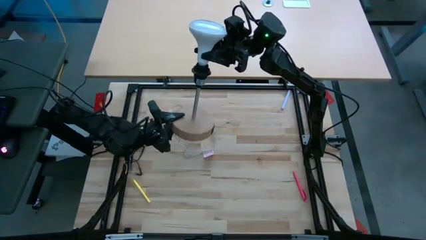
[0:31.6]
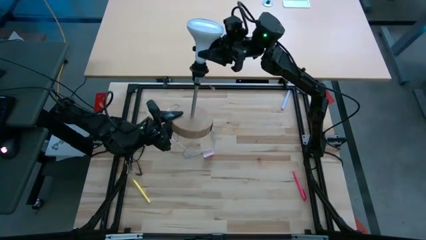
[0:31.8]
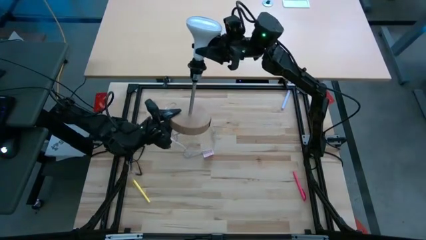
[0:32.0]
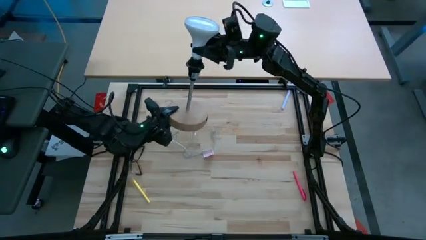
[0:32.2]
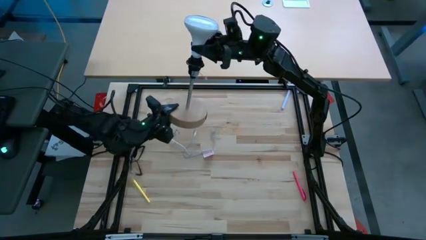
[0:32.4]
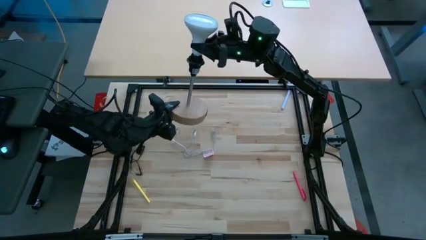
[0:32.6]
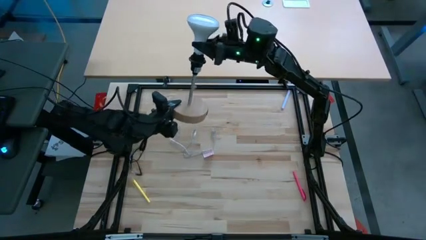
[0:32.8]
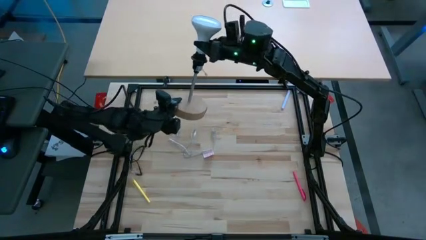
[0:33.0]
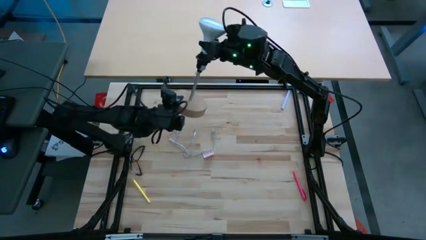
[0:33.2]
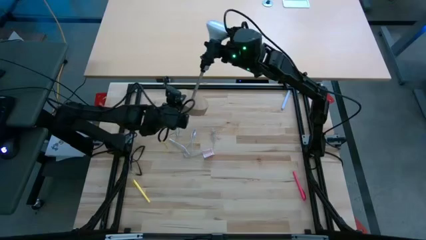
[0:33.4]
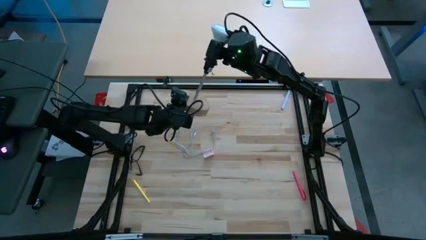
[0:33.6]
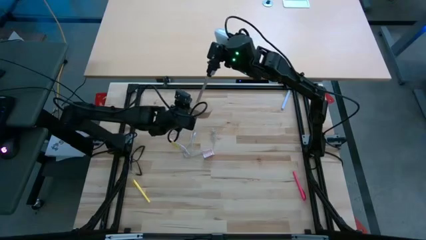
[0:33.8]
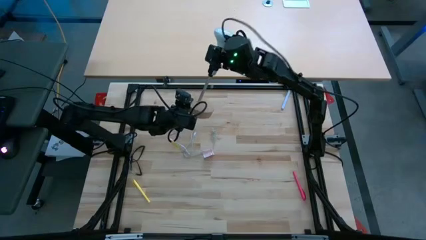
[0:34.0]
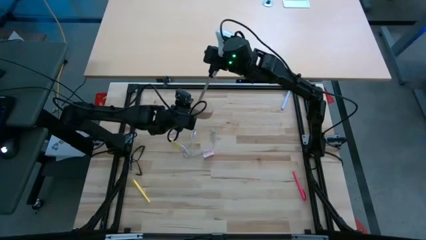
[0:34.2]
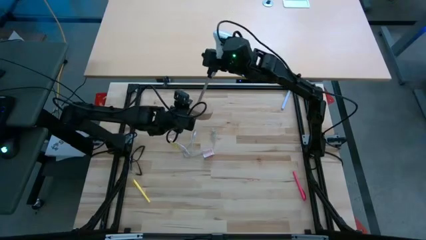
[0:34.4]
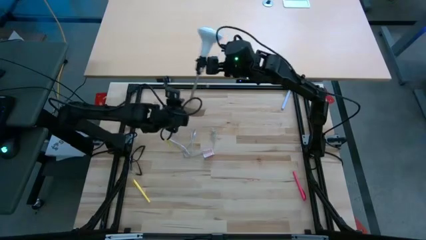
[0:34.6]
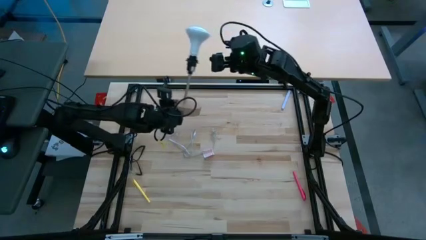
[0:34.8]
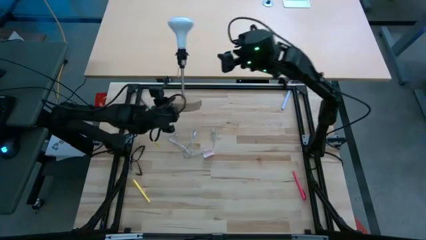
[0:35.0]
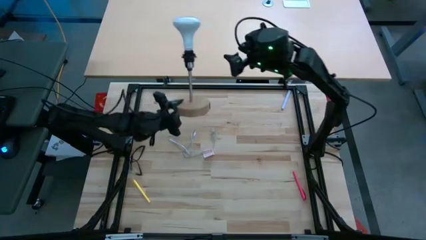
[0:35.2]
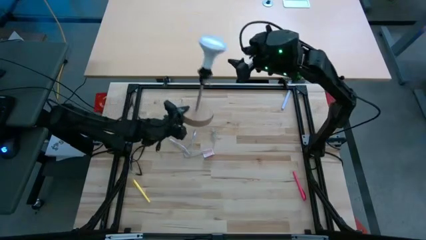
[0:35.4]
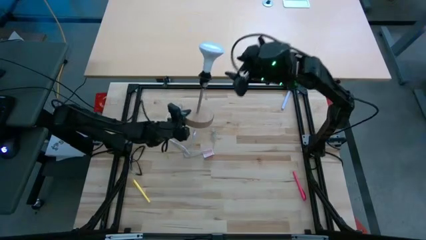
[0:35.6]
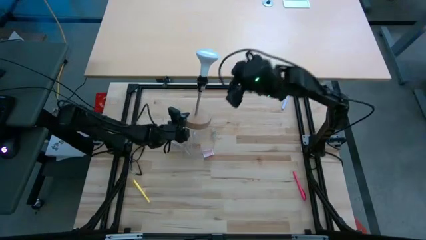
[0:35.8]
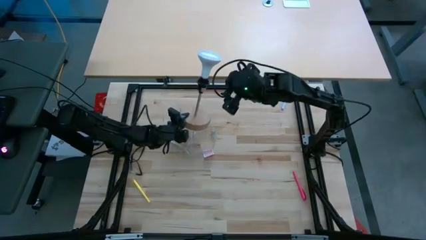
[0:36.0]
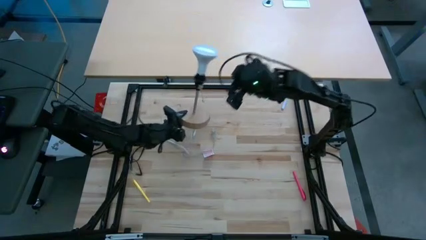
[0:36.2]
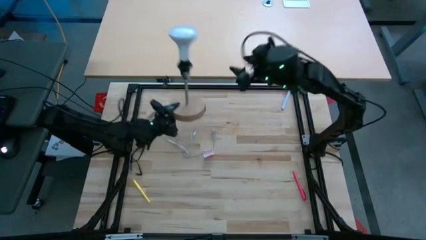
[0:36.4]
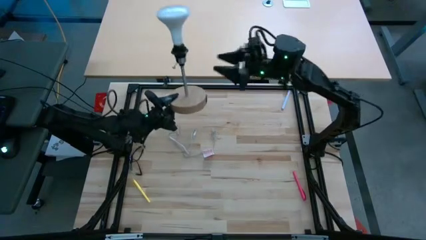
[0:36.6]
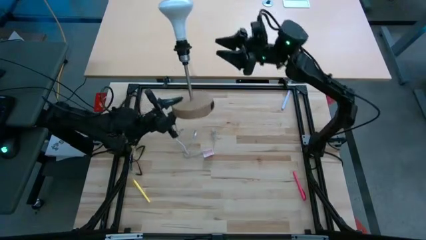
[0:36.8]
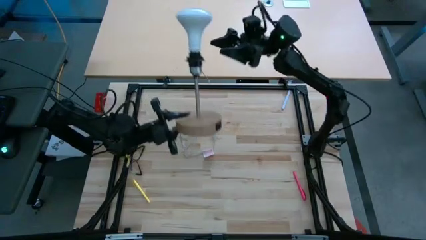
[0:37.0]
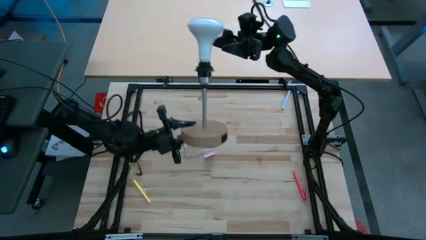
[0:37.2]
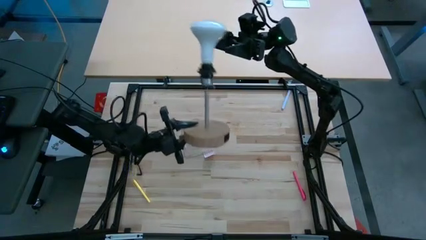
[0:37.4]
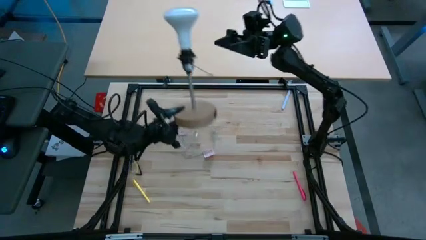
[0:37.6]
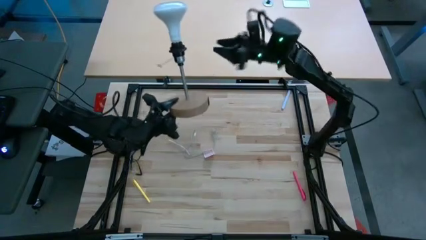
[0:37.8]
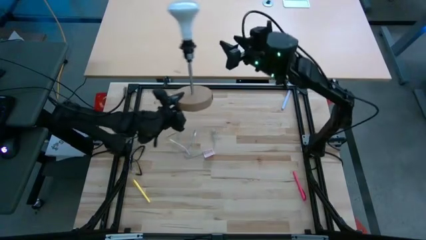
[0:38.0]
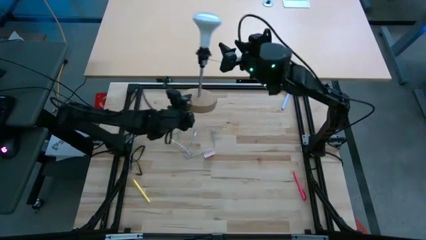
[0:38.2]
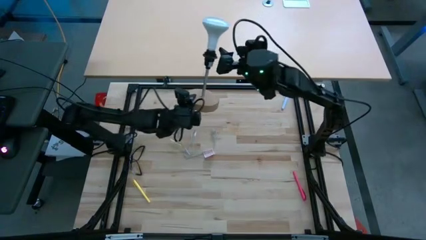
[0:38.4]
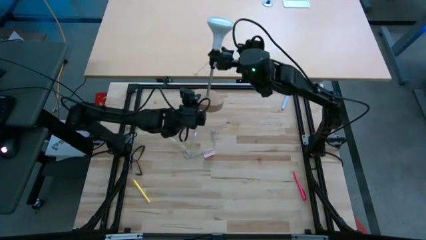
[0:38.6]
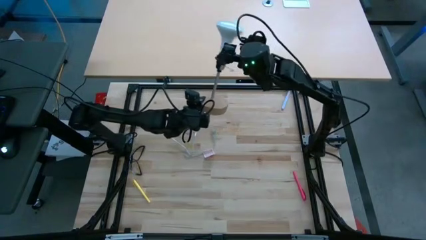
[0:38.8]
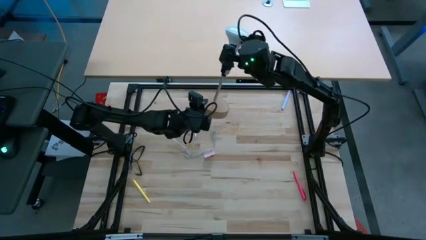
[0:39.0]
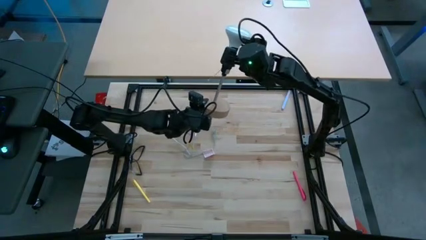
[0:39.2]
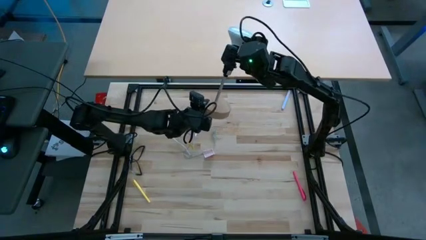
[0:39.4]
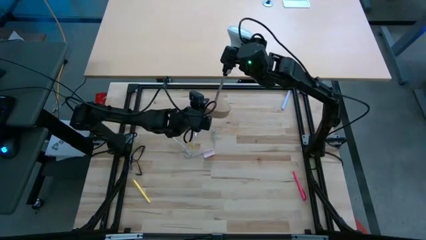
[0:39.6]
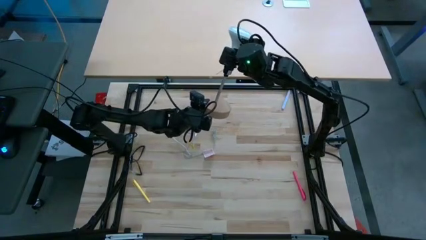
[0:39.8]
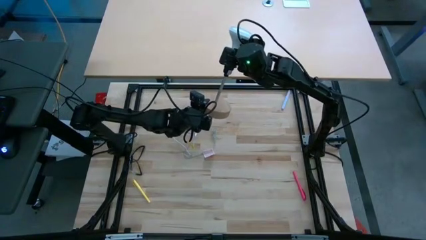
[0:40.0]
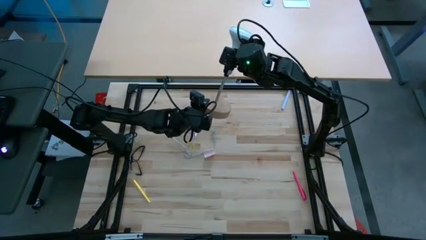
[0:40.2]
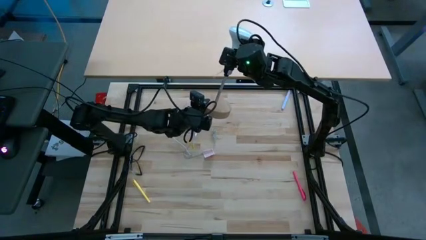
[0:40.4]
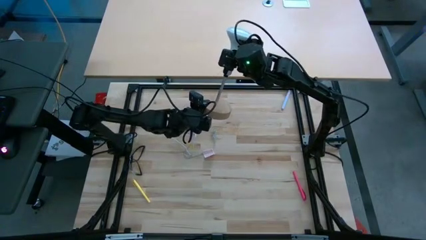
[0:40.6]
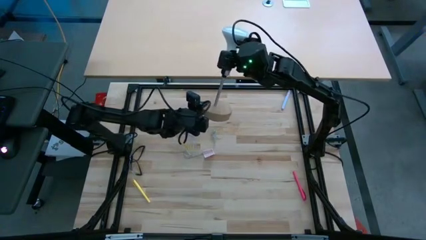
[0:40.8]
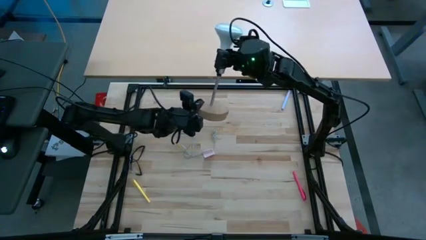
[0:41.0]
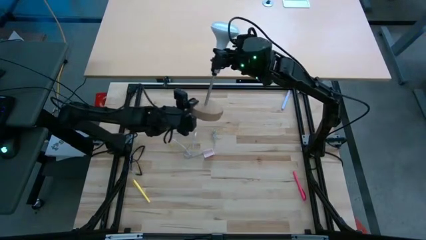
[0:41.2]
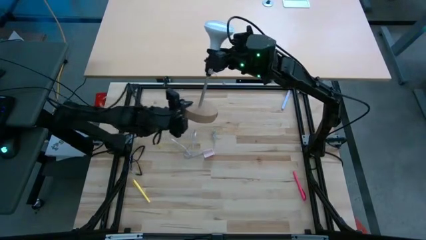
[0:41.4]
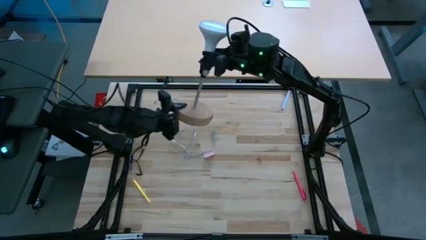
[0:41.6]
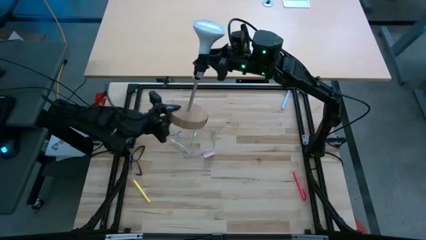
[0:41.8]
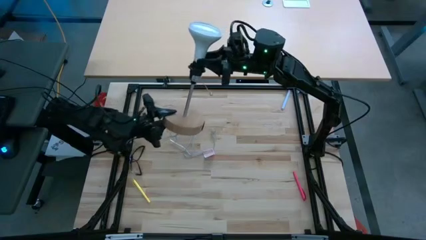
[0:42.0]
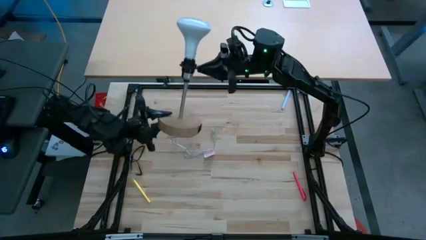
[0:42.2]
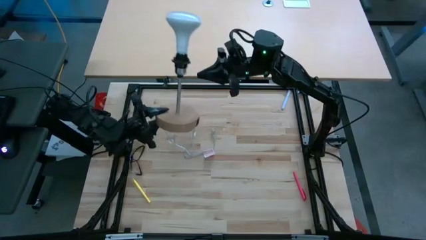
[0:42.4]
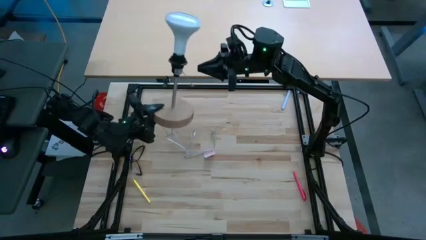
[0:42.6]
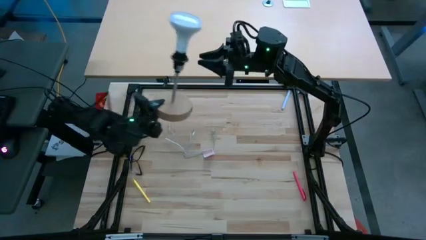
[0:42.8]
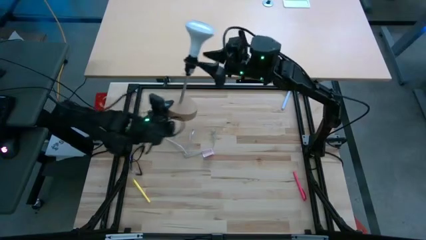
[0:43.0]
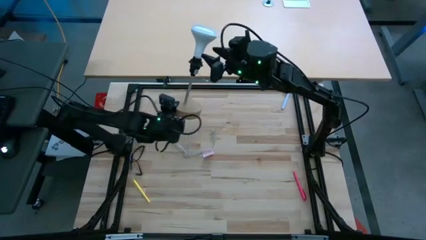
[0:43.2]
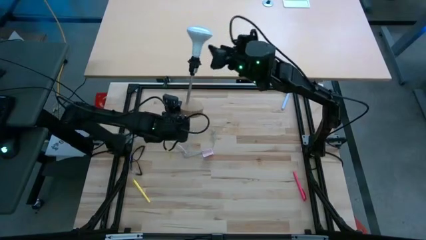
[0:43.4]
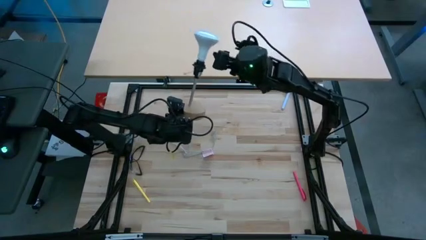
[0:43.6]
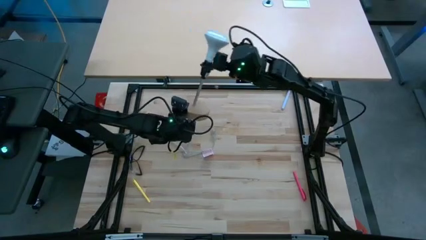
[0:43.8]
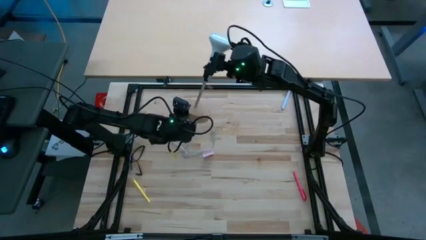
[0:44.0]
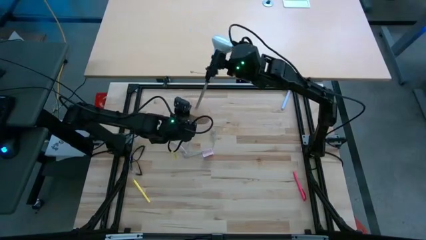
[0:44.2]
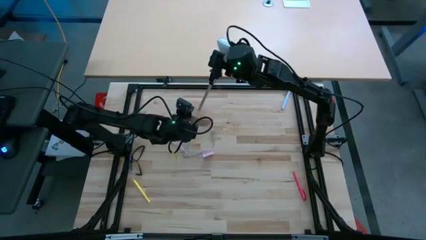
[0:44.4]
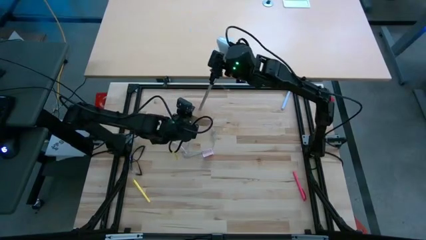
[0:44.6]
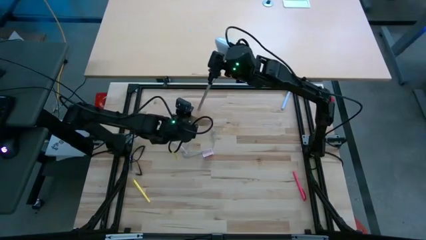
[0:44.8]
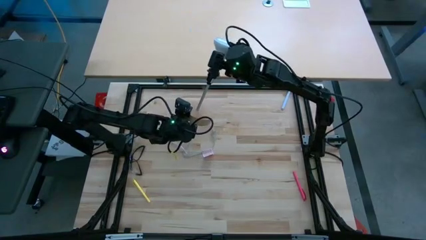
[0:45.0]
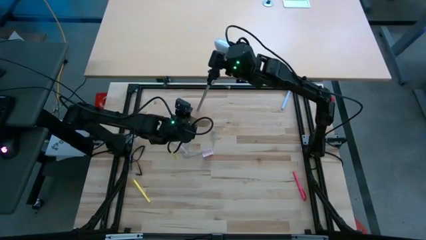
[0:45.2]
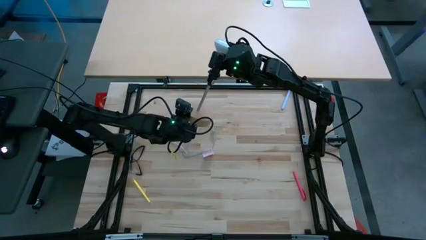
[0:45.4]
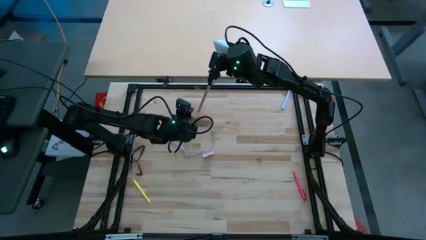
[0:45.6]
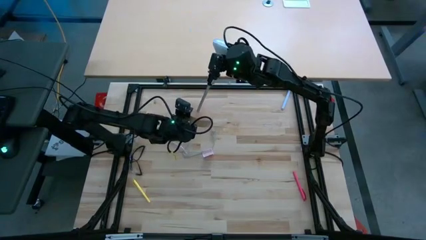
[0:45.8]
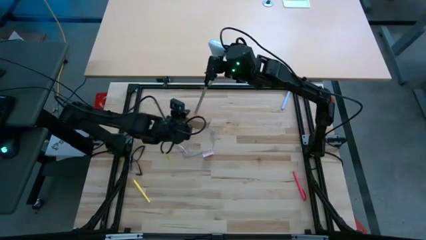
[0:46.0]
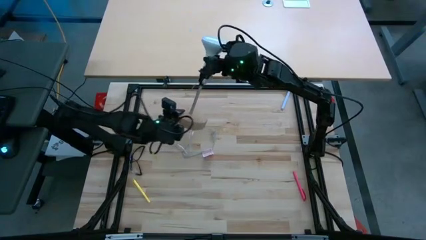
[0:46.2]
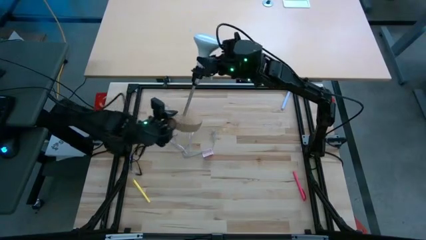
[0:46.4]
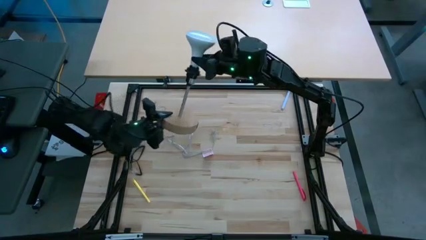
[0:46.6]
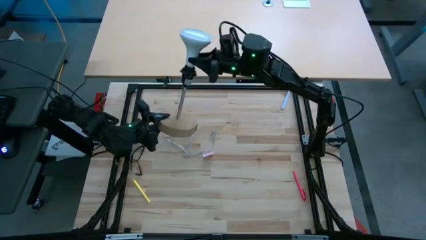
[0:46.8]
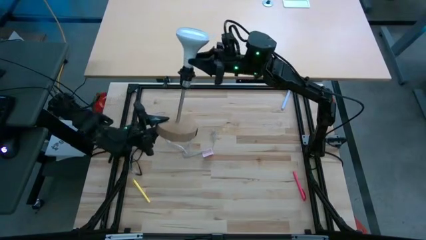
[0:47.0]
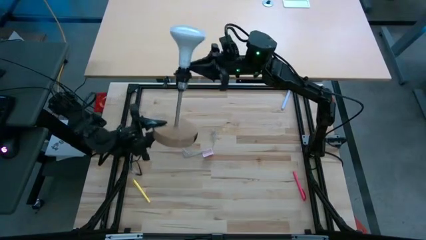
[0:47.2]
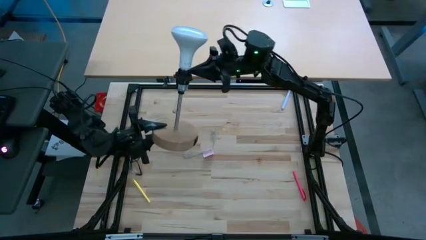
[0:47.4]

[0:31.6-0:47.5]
Task: Screw lightbulb
Insert the light bulb into the lamp holder
